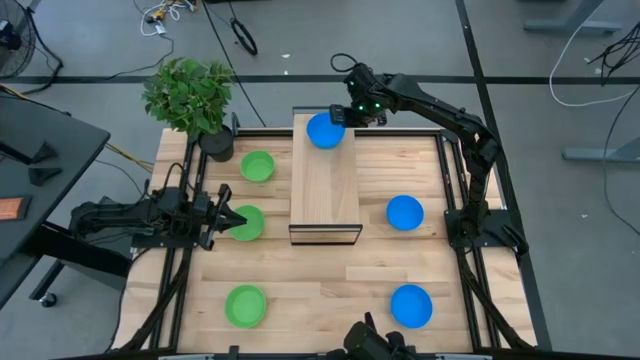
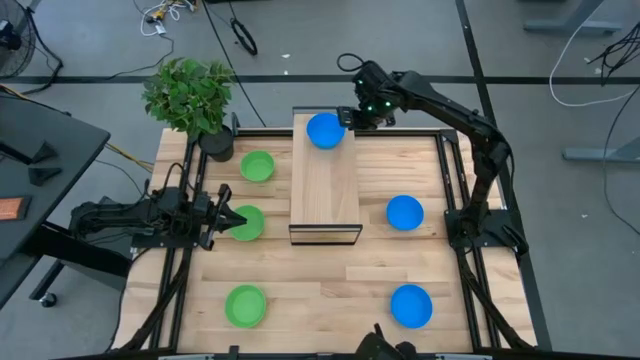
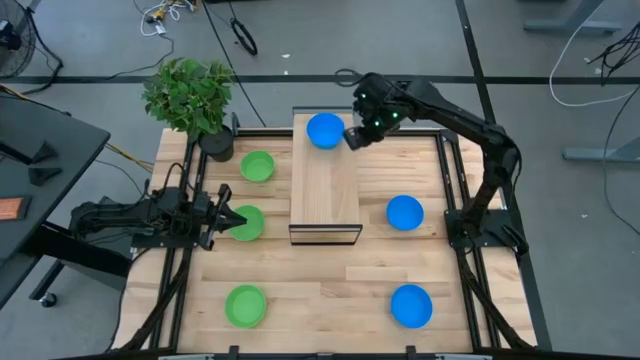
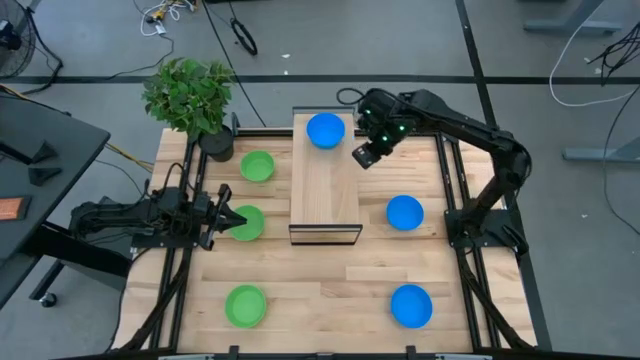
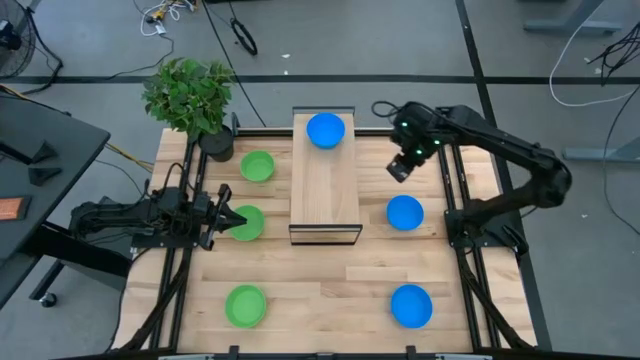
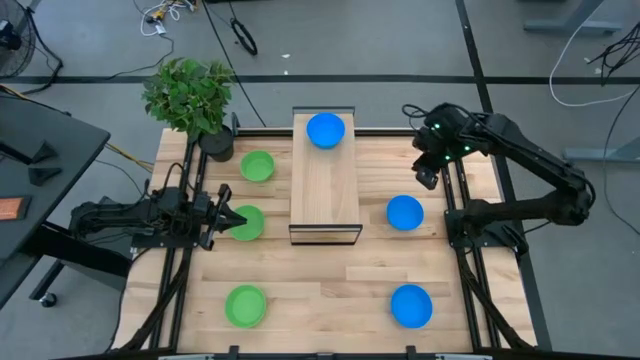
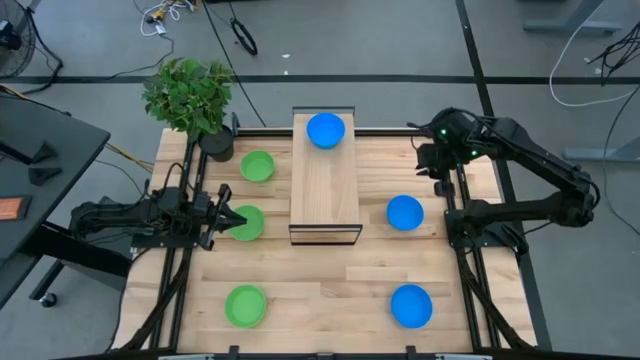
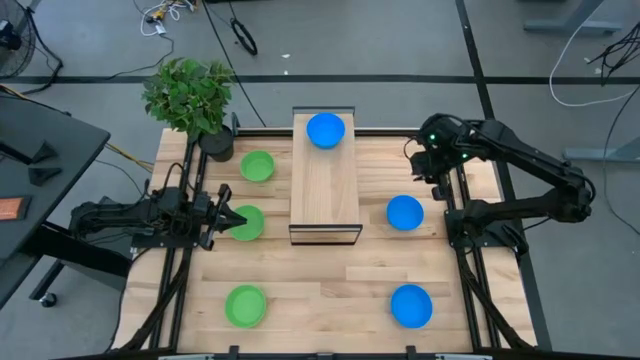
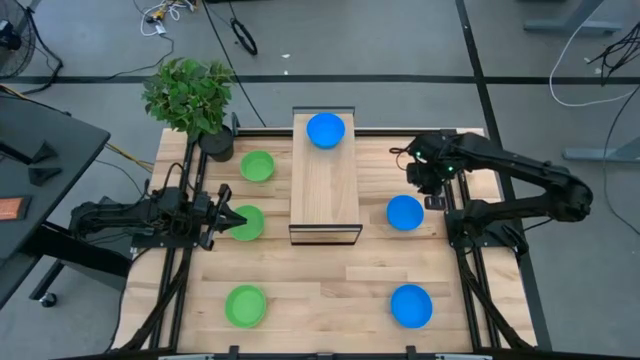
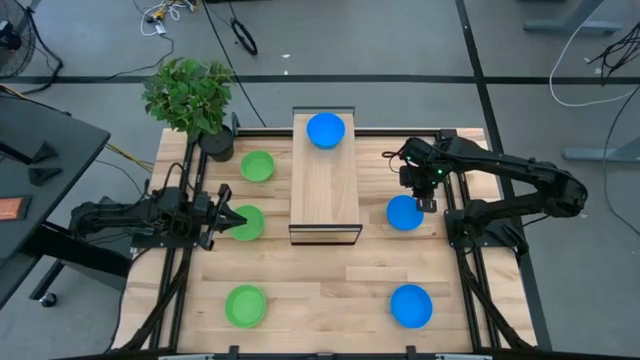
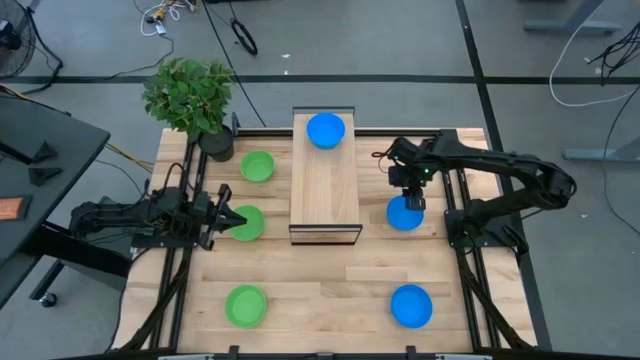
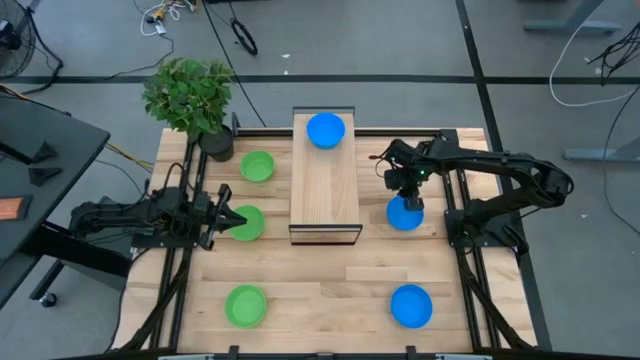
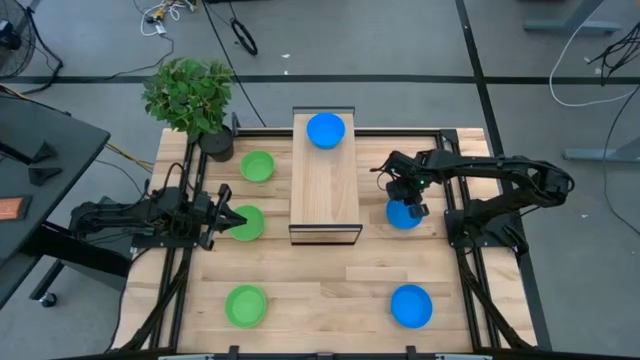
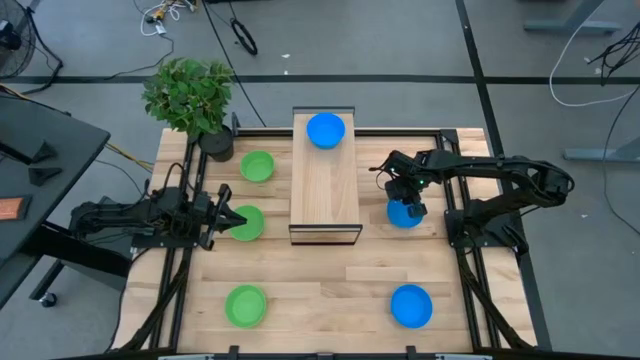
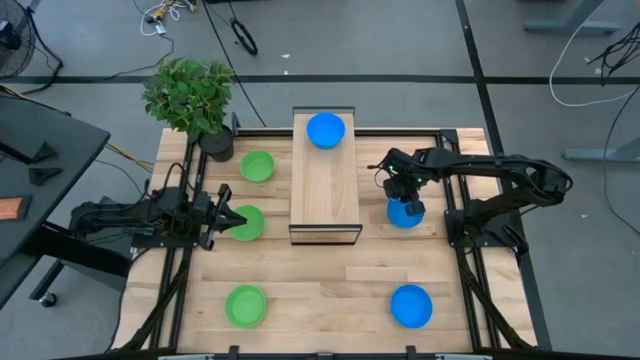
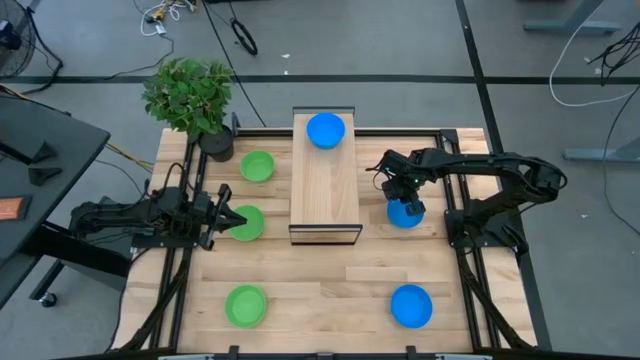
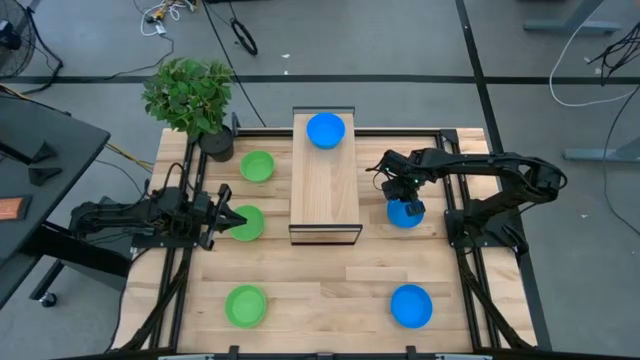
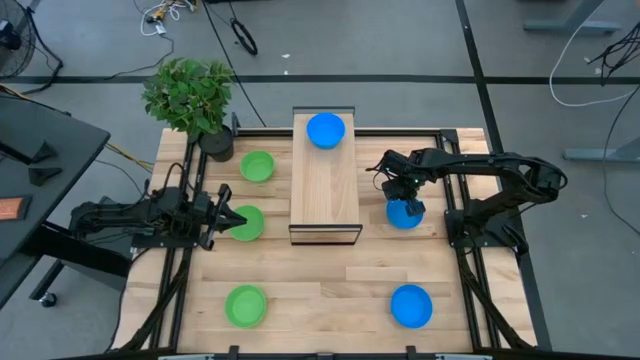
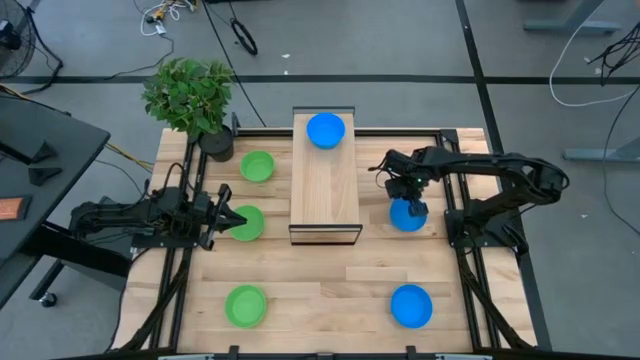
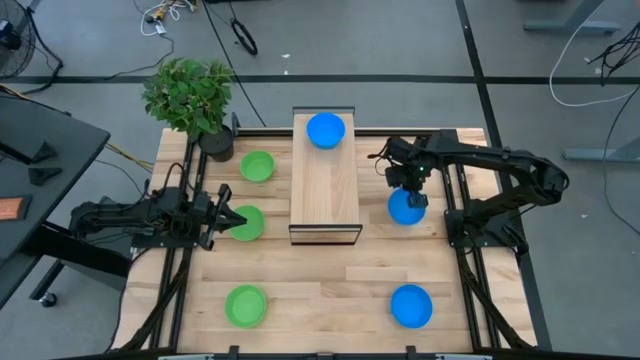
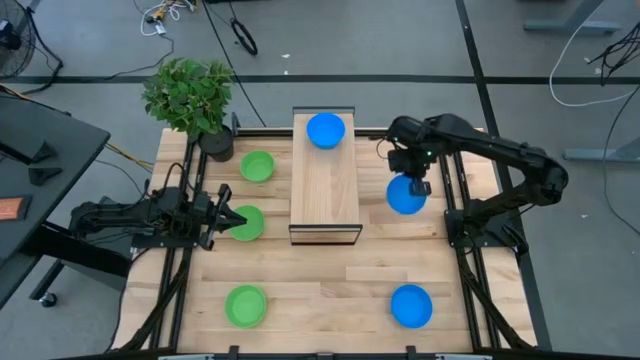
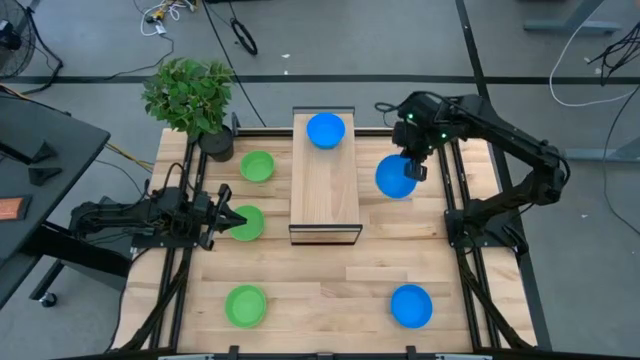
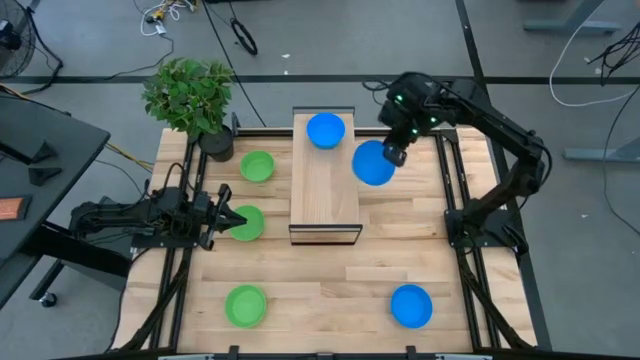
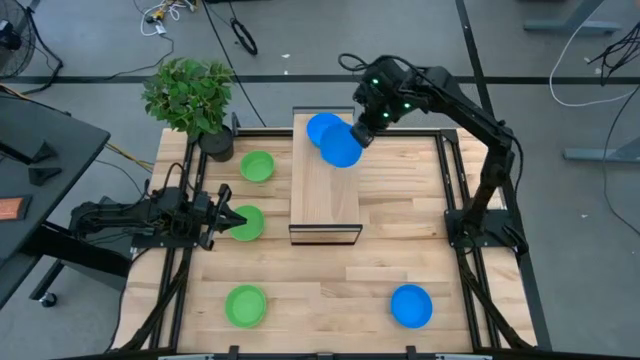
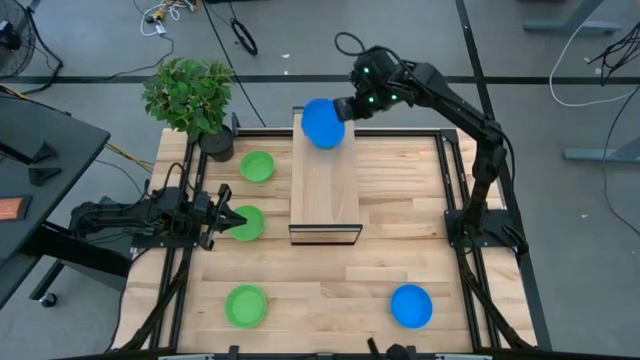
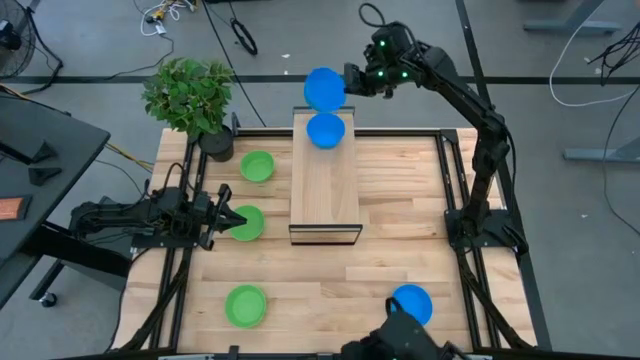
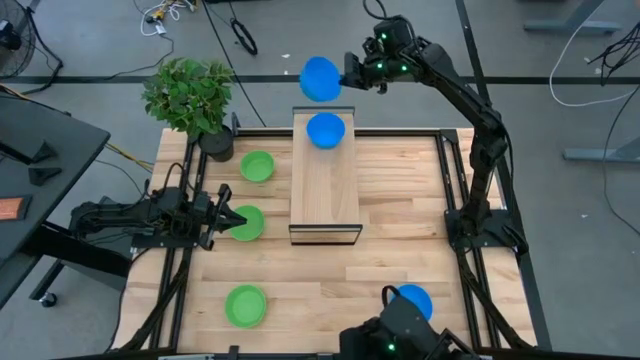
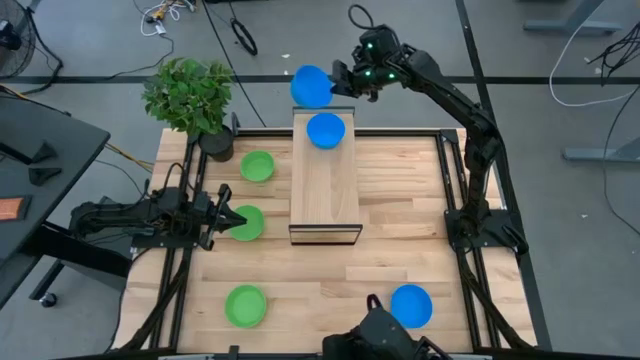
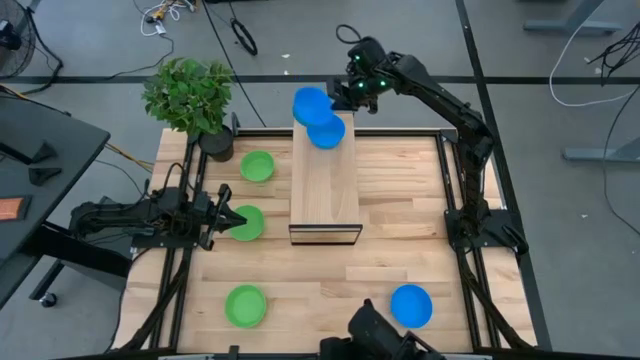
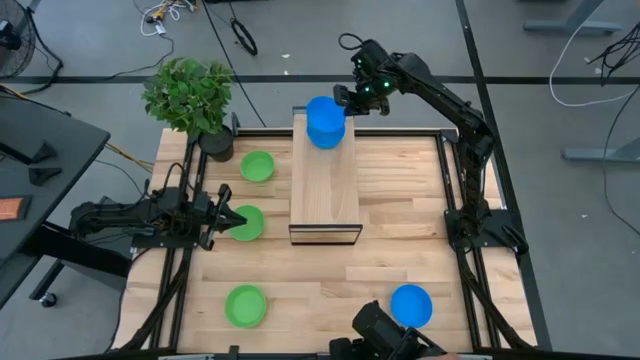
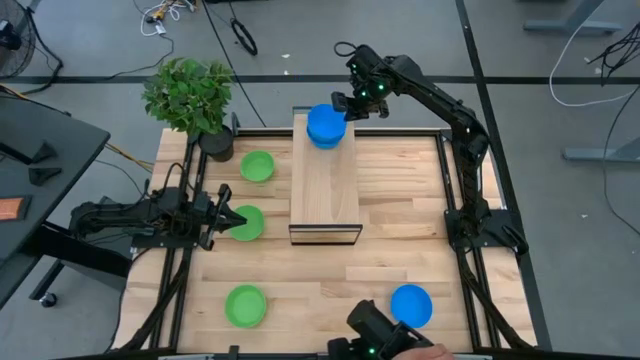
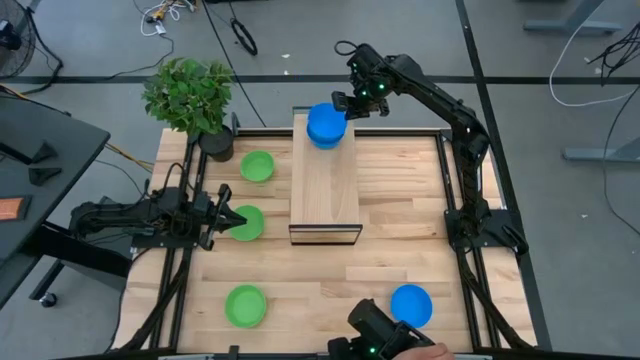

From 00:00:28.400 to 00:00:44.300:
Task: Pick & Place Mini bowls
Stack the top blue bowl on the blue bowl on the shelf

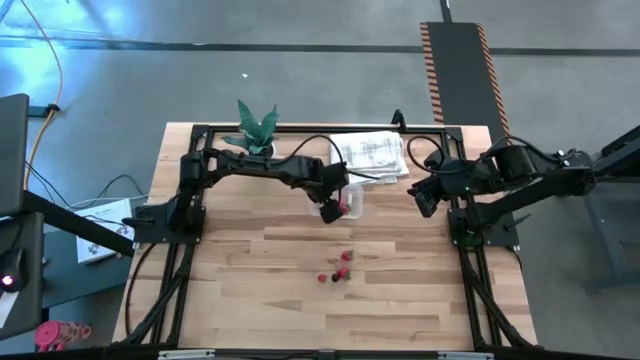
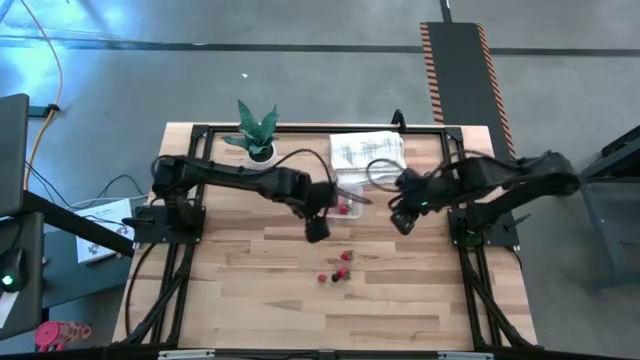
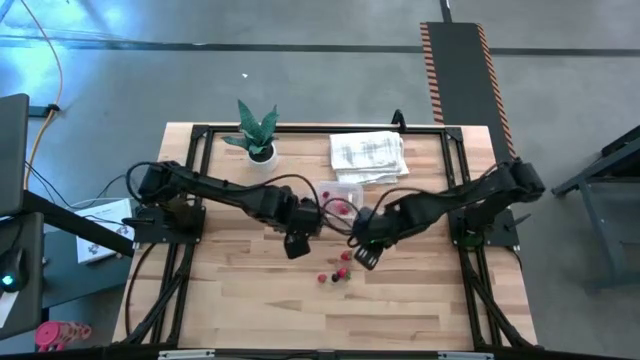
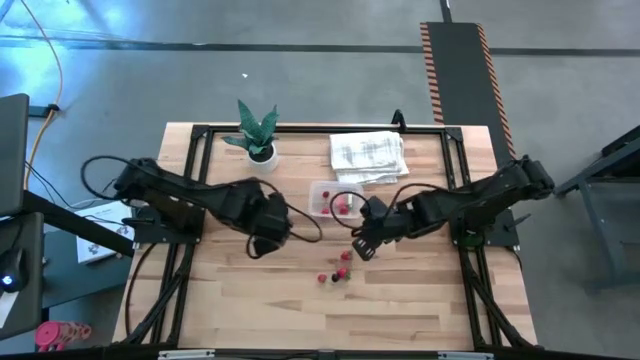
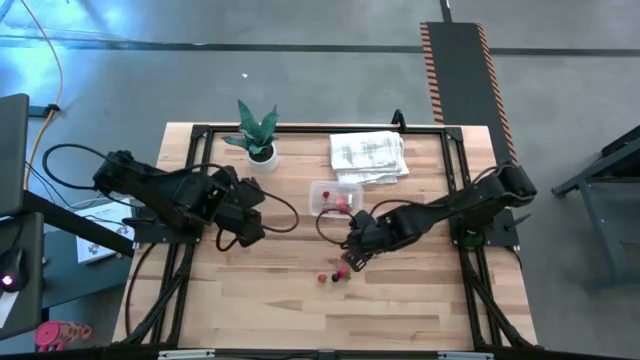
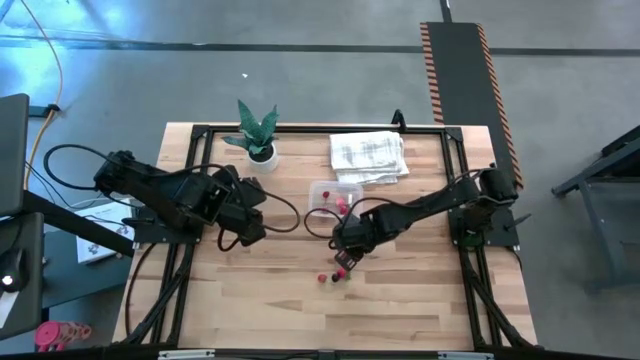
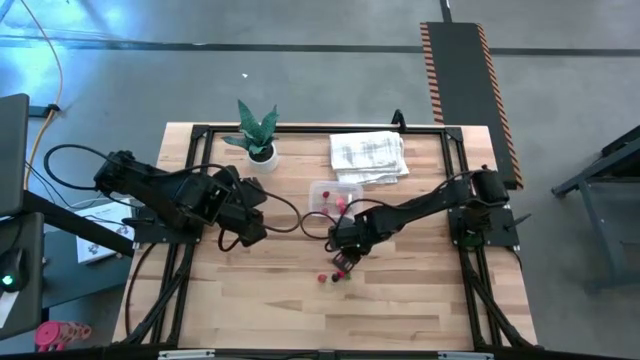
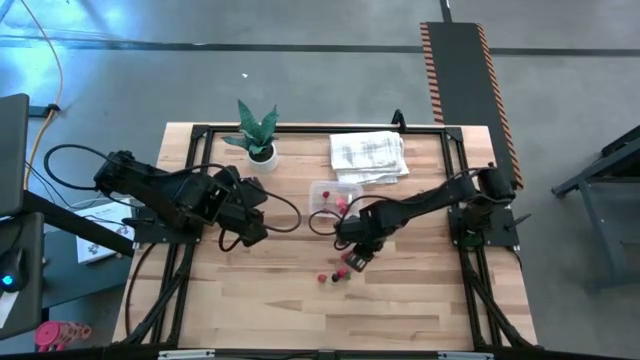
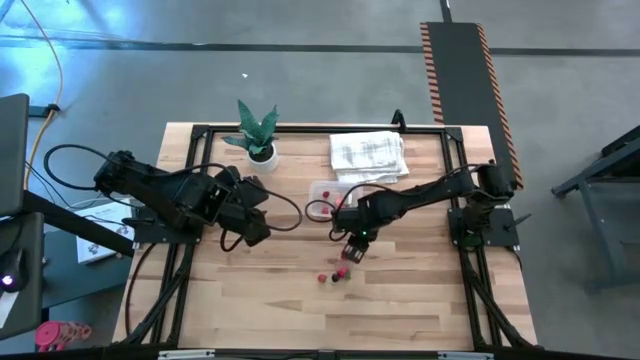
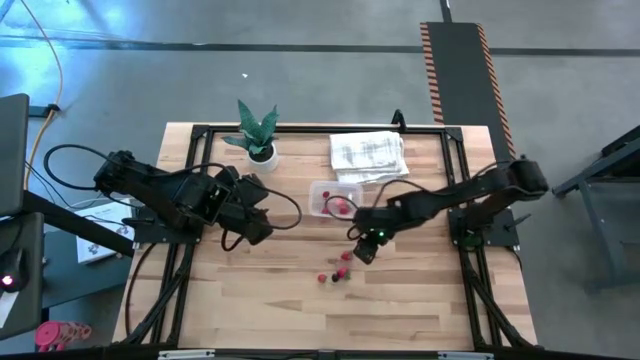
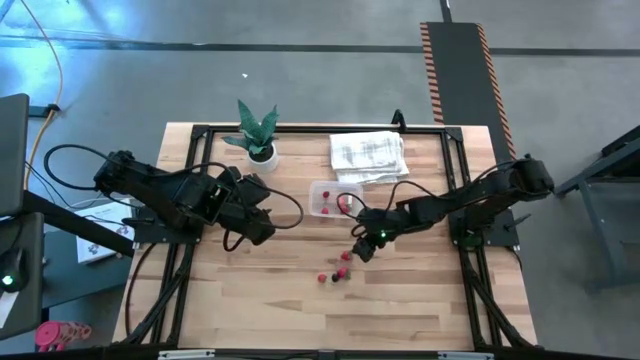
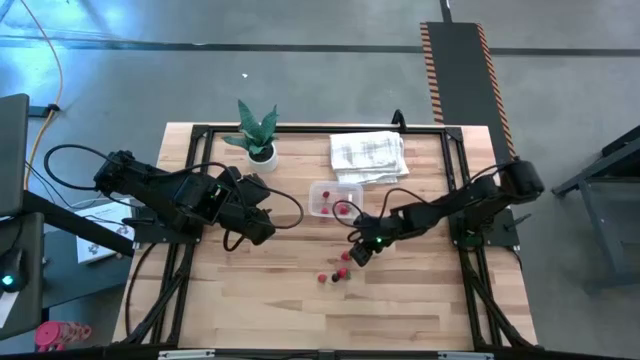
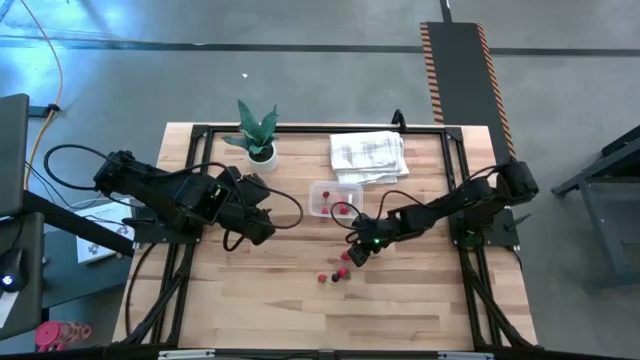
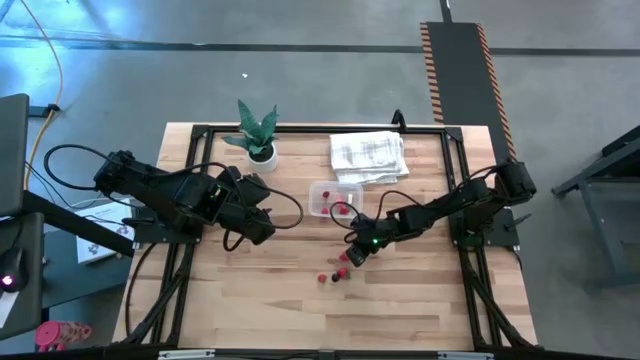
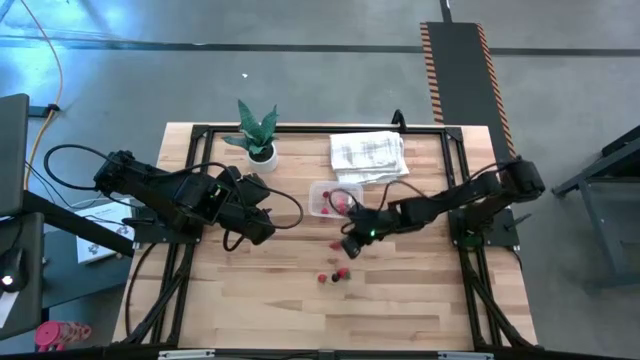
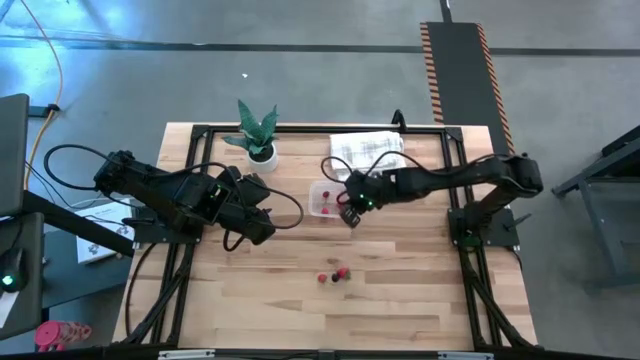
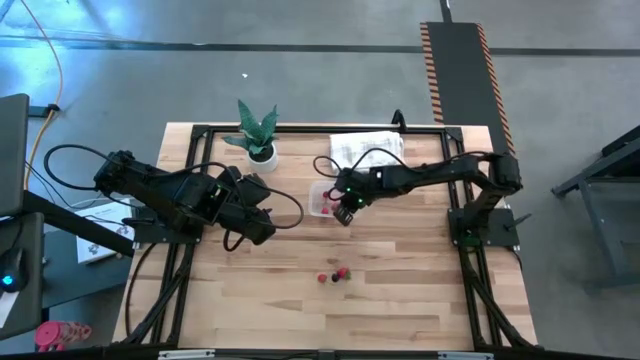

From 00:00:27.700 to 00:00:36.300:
Task: Pick and placing Produce into tupperware
Put the strawberry into the transparent bin
